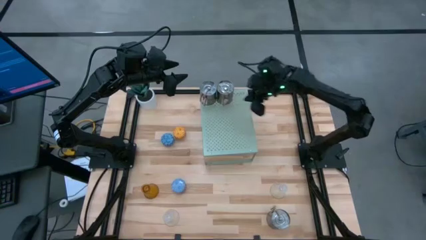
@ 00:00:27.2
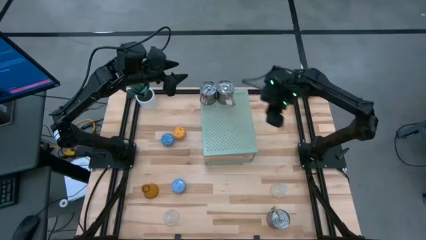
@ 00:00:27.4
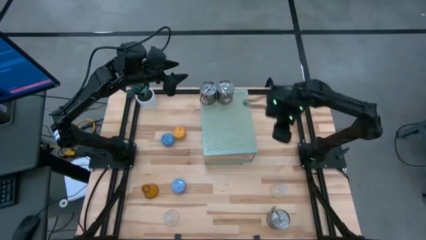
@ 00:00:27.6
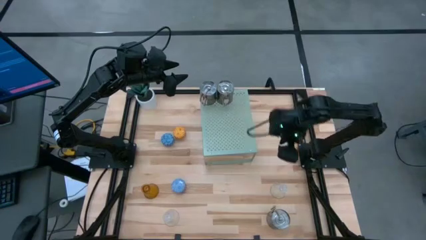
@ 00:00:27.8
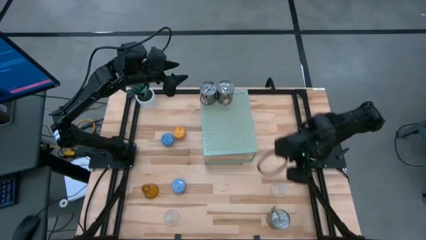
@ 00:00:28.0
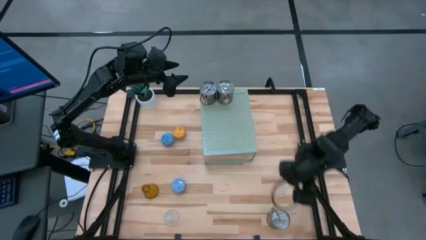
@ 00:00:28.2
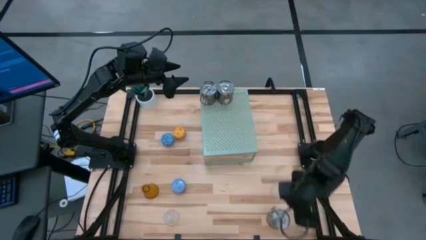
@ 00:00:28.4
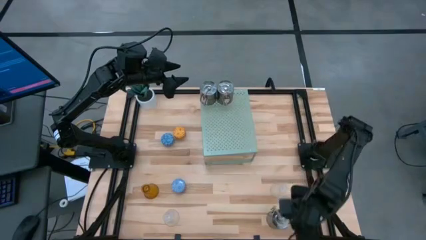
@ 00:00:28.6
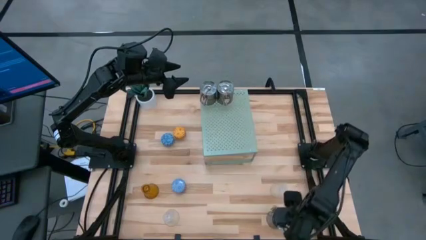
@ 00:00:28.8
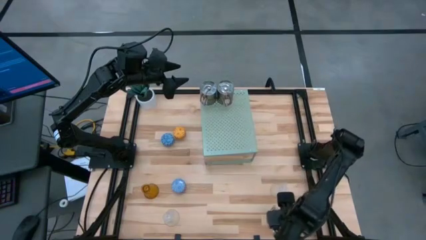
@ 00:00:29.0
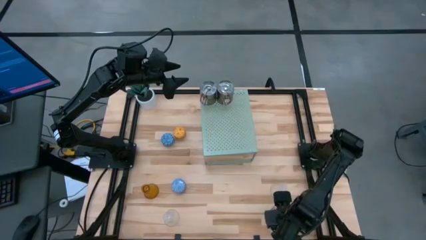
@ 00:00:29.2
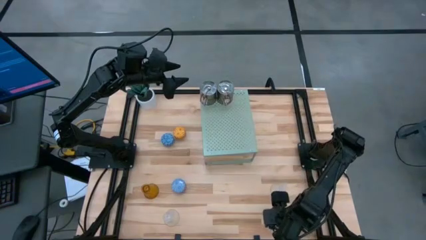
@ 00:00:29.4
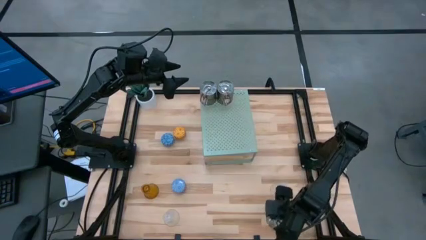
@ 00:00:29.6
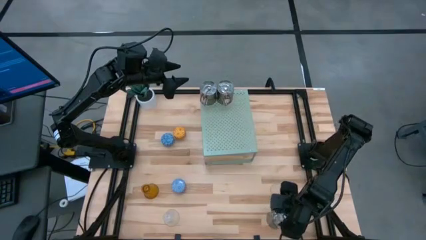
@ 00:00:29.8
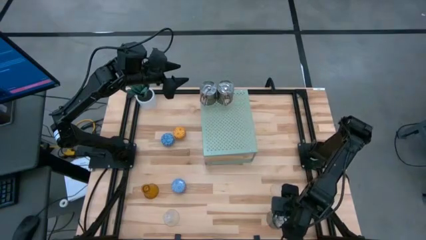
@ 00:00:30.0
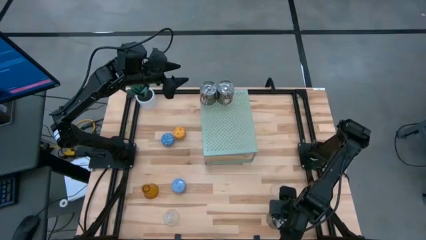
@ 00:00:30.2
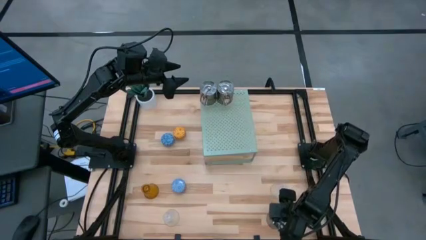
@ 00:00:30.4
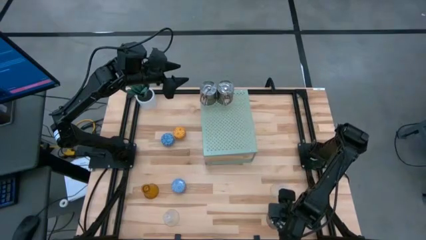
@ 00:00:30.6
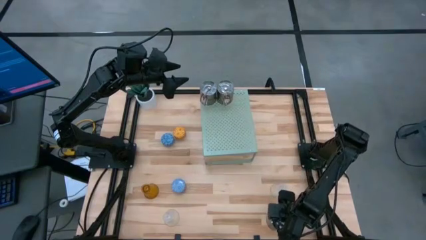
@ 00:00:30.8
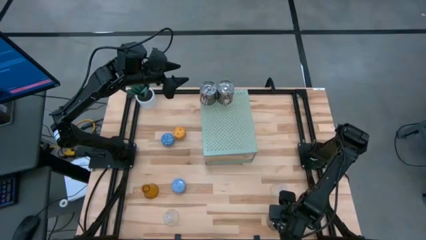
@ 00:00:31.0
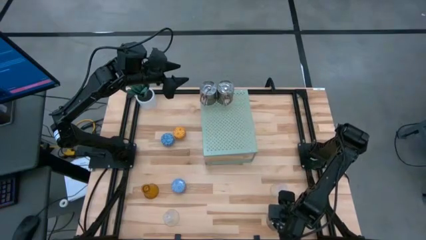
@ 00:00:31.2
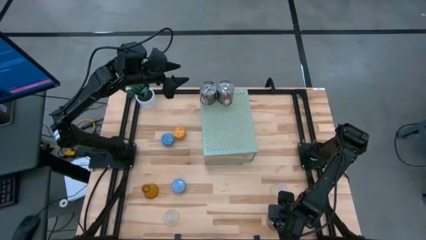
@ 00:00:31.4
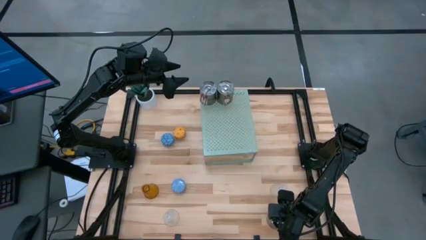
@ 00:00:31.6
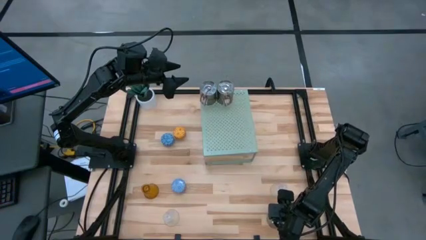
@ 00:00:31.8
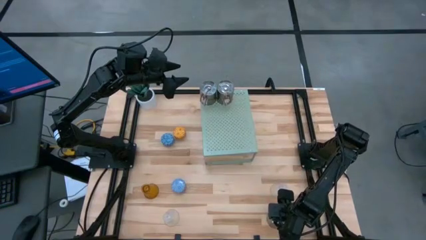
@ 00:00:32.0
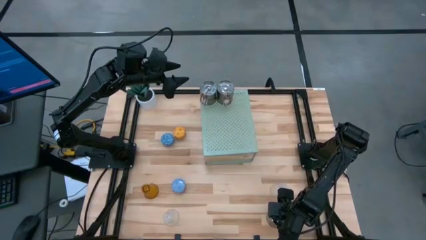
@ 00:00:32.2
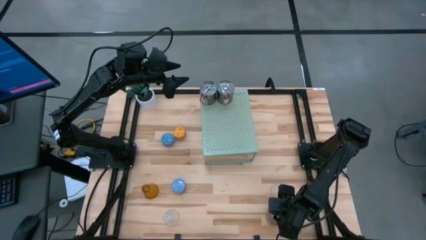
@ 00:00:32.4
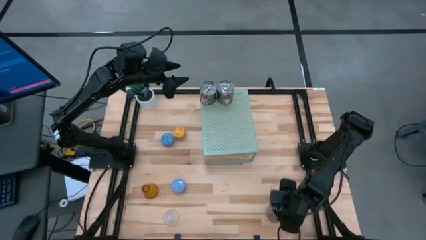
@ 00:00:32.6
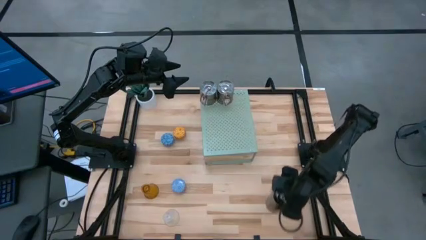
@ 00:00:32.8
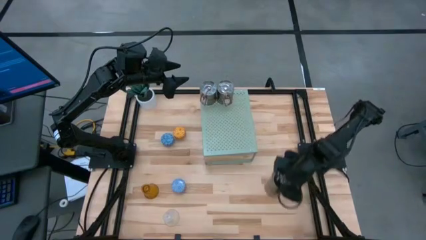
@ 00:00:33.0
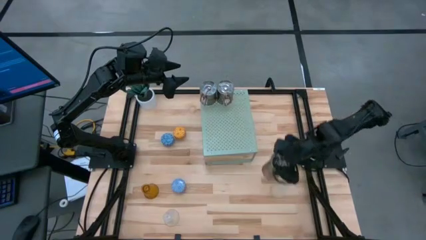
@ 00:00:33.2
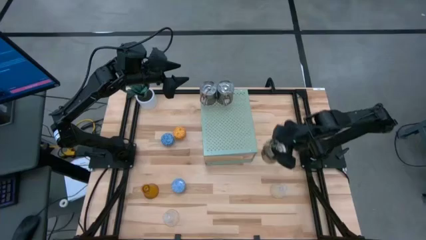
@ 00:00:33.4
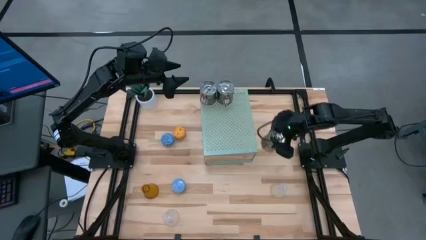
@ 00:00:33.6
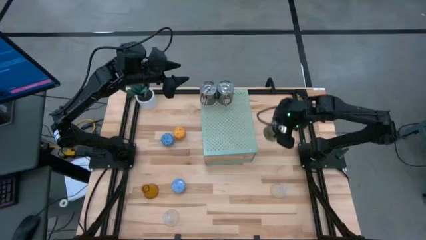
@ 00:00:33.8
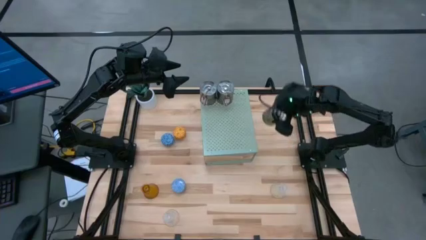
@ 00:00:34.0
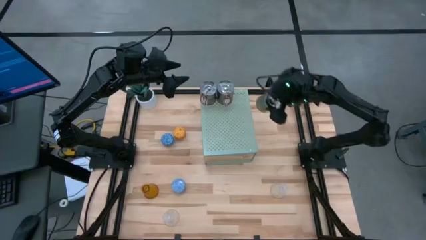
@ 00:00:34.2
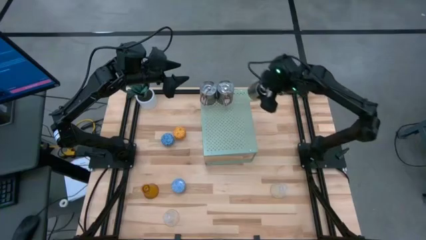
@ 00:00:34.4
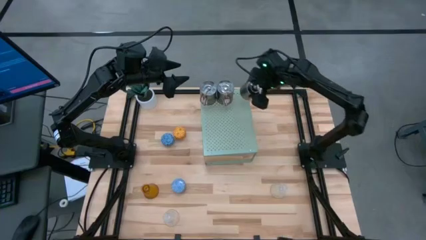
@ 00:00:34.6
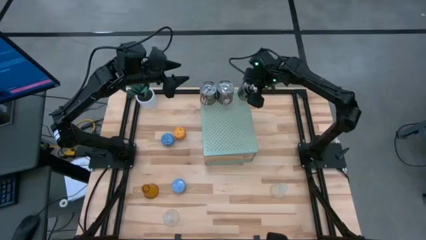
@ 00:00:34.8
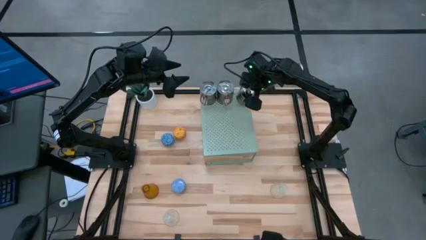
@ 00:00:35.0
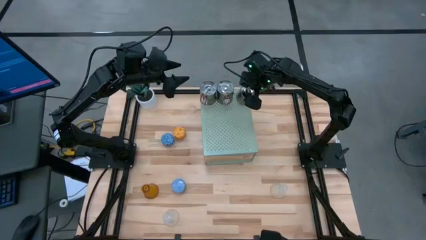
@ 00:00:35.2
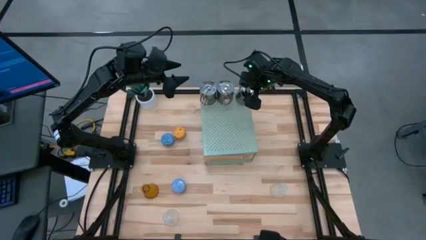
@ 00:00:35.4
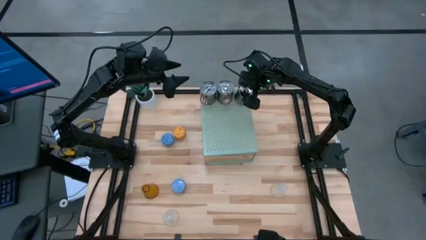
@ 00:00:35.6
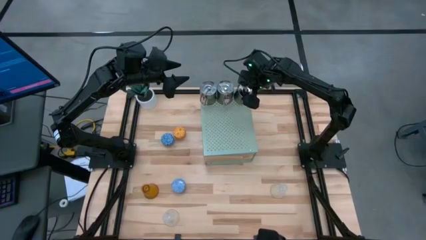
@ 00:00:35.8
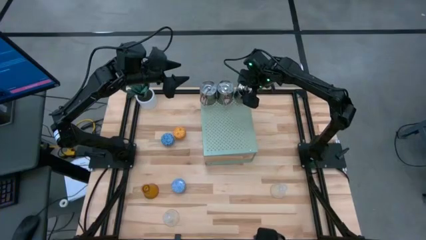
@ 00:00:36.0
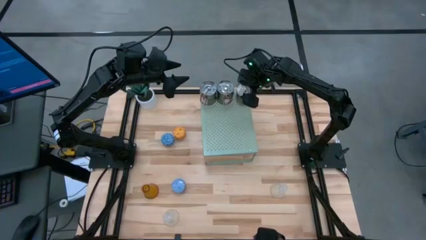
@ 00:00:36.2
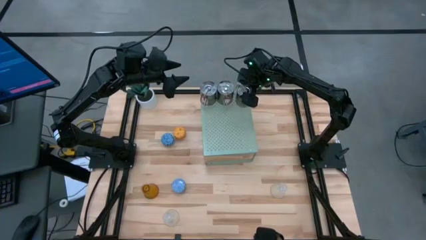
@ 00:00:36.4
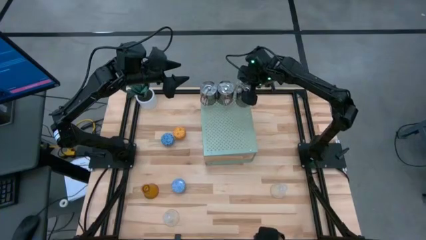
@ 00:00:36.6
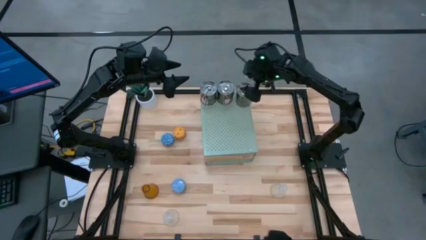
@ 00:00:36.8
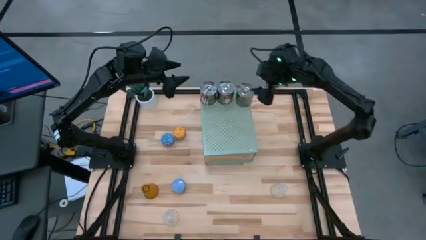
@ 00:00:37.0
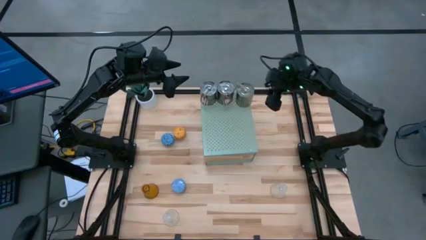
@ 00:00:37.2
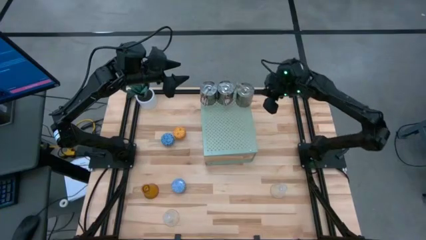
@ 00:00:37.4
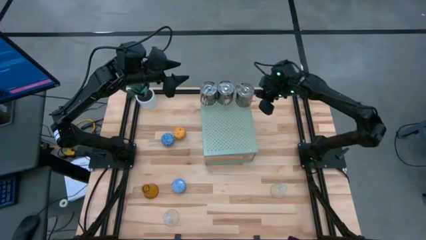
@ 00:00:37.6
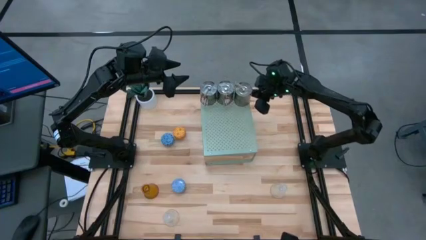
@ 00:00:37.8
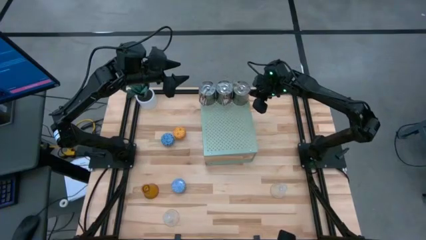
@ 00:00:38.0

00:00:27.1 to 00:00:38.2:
Task: Pick & Place candle stick holders
Put the silver scented candle on the shelf

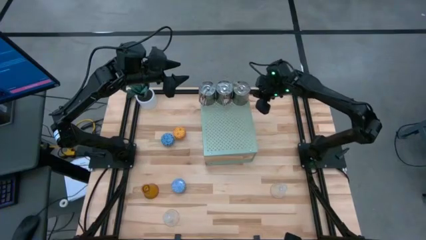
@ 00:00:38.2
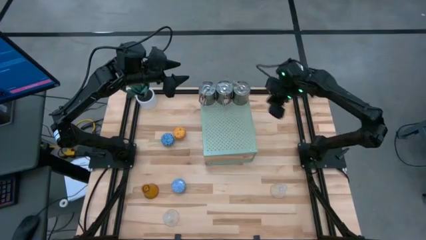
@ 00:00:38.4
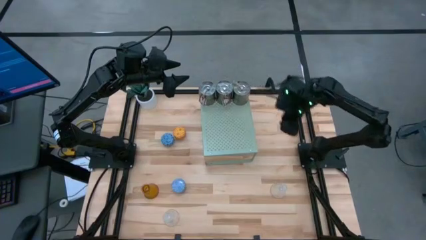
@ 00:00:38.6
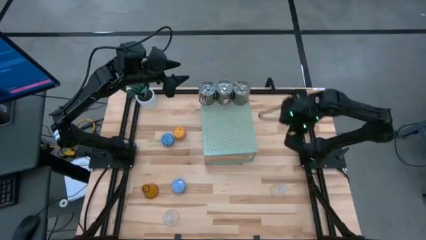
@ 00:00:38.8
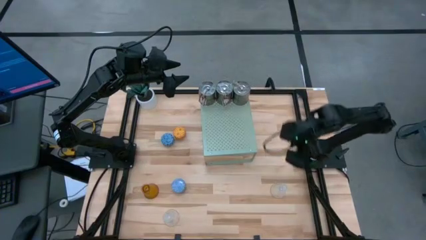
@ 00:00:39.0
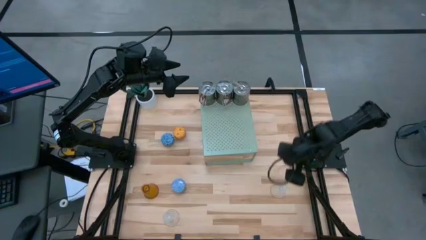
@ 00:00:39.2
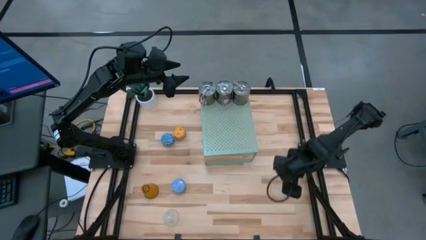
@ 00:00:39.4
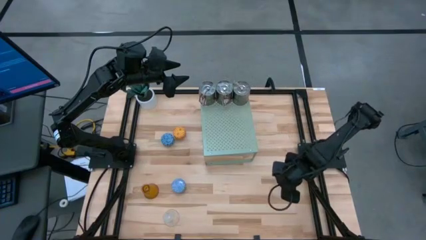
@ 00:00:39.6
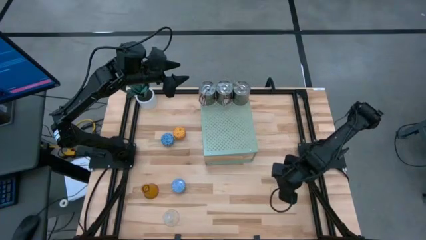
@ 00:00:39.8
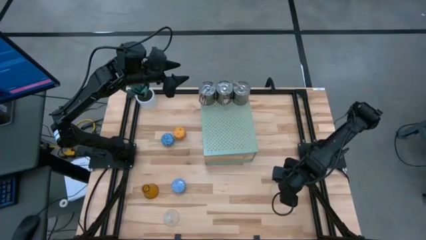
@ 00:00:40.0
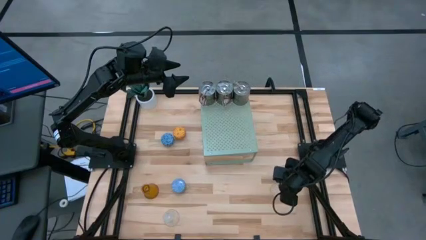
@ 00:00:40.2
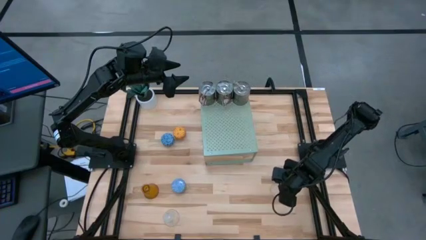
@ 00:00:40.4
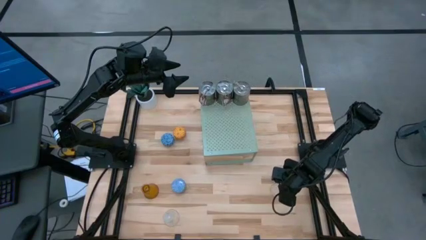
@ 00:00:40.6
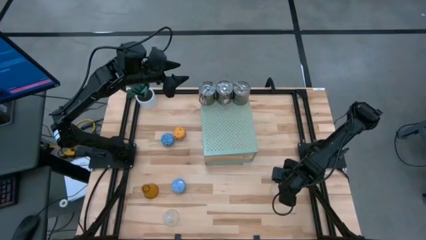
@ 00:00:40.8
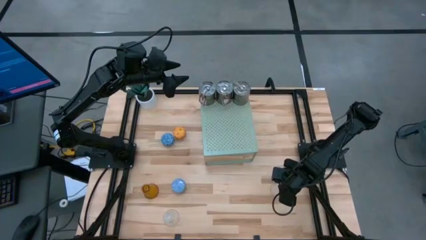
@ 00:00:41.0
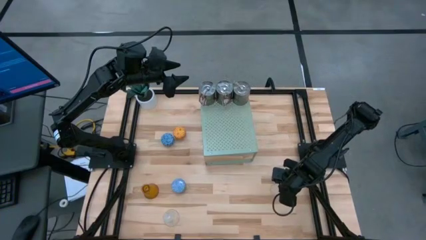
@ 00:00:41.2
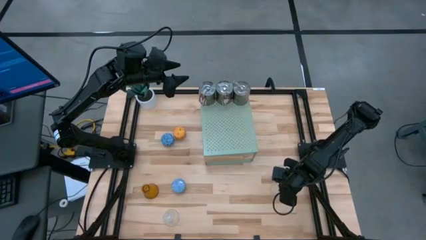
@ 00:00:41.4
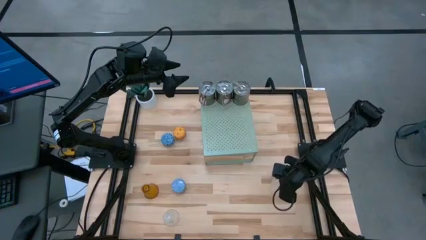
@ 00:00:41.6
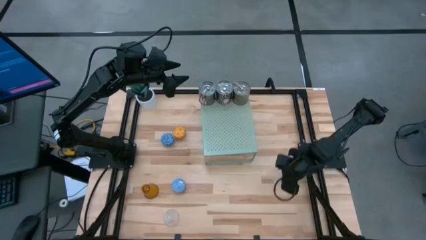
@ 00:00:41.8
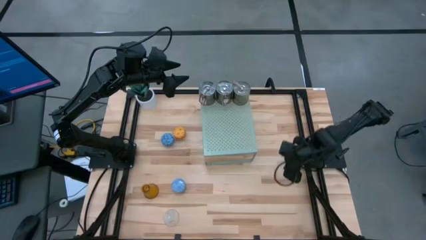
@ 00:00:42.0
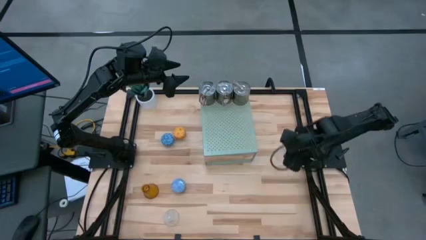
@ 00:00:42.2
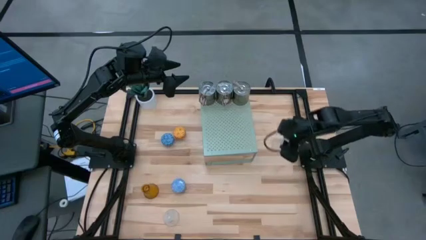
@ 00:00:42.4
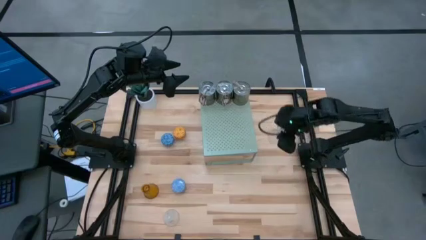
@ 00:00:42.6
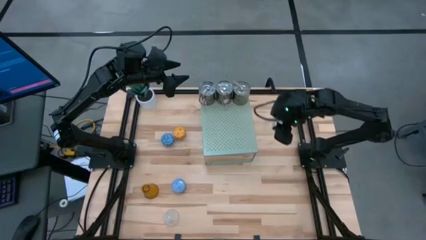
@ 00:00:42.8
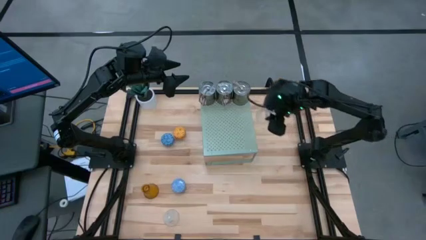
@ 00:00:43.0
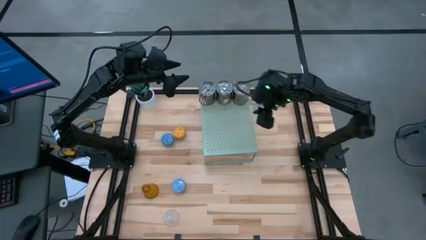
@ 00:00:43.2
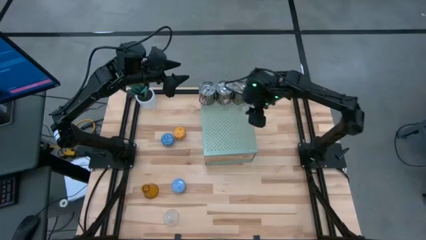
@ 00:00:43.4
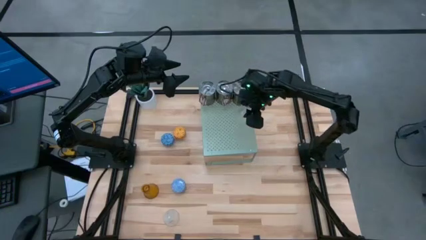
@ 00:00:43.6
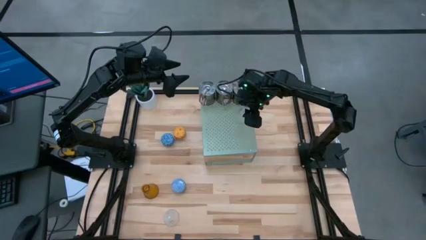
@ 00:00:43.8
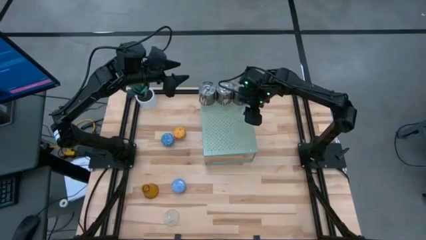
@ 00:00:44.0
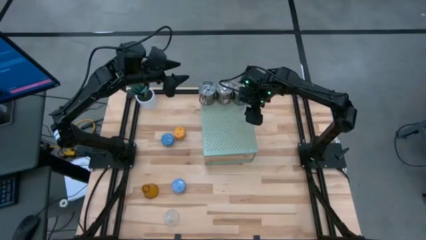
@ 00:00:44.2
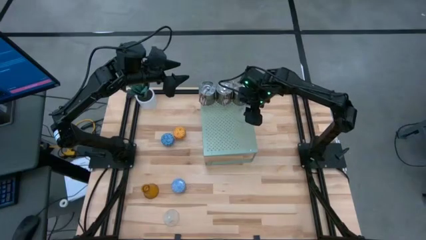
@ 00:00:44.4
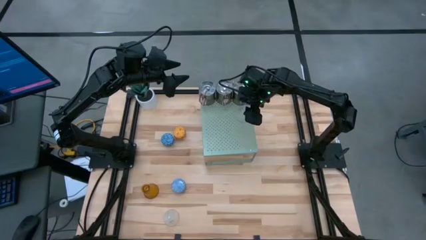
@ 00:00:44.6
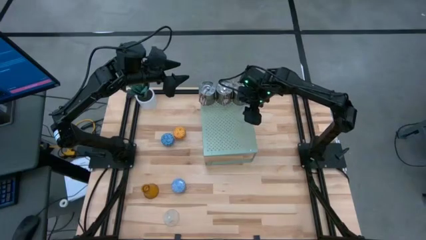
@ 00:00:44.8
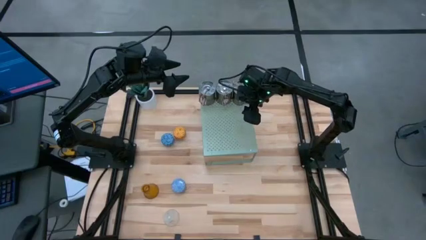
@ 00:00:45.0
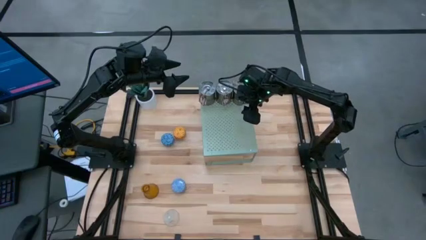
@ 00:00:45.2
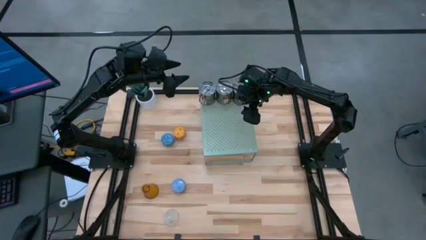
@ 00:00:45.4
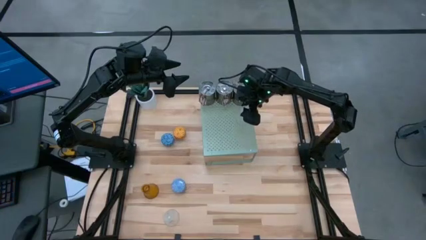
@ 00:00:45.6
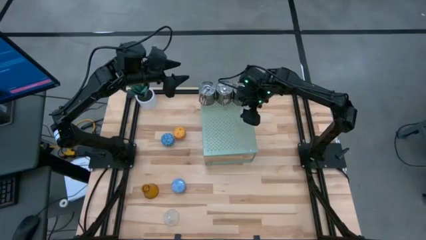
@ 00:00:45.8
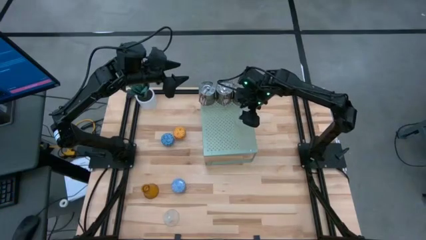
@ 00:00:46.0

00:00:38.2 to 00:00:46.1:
Put the right transparent candle holder on the shelf
